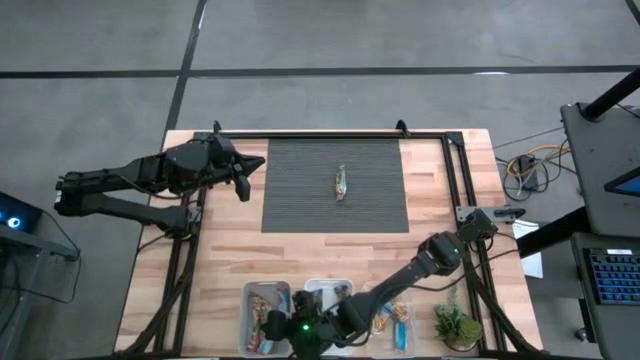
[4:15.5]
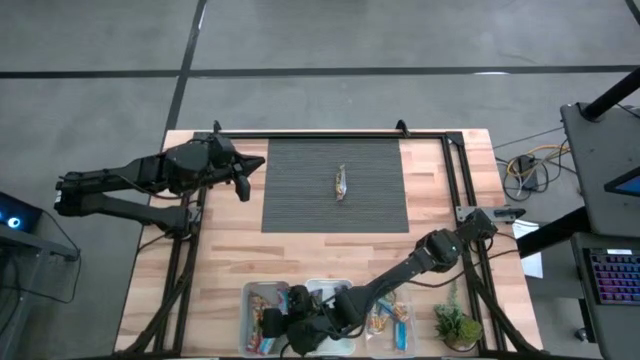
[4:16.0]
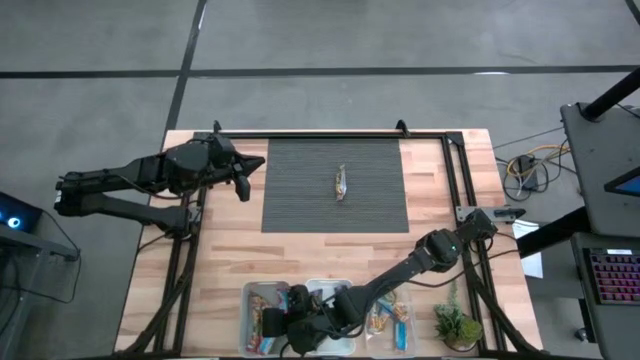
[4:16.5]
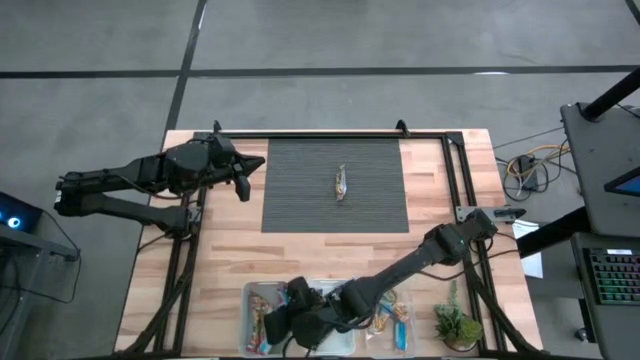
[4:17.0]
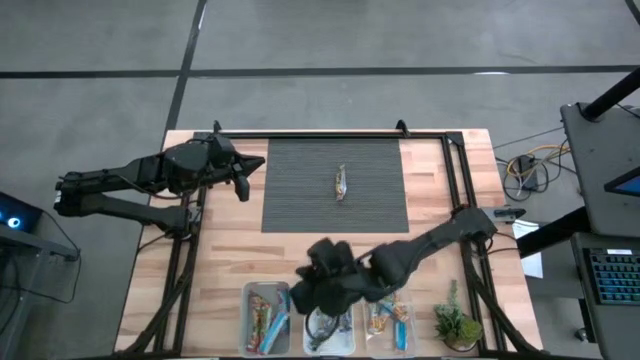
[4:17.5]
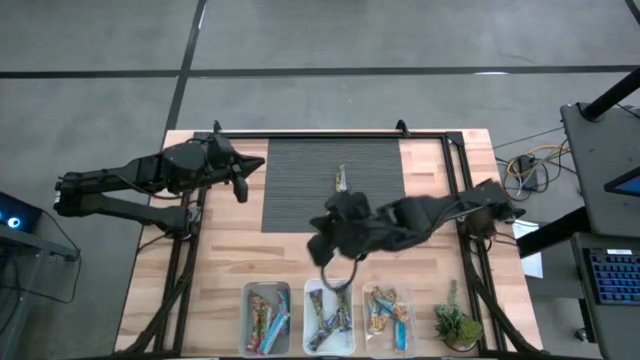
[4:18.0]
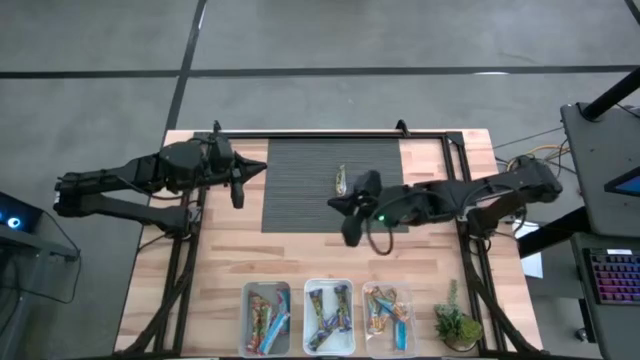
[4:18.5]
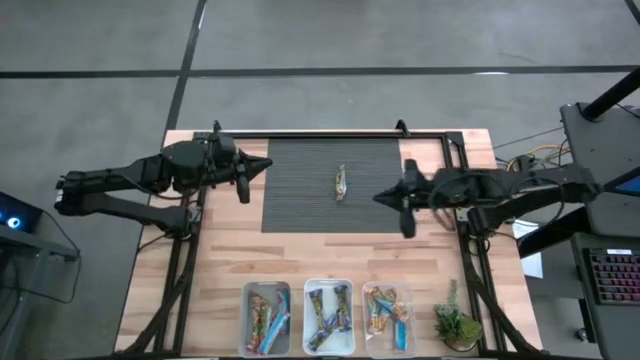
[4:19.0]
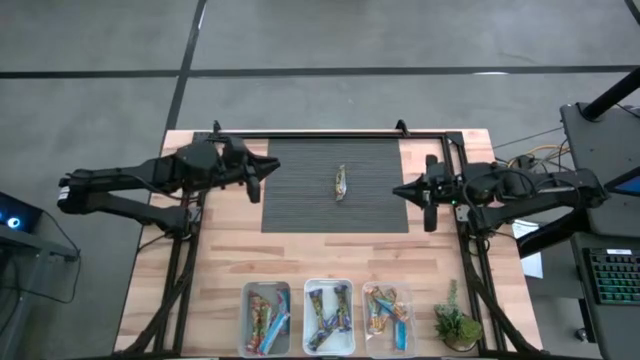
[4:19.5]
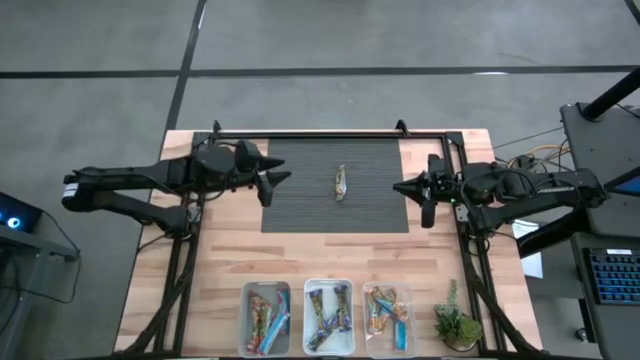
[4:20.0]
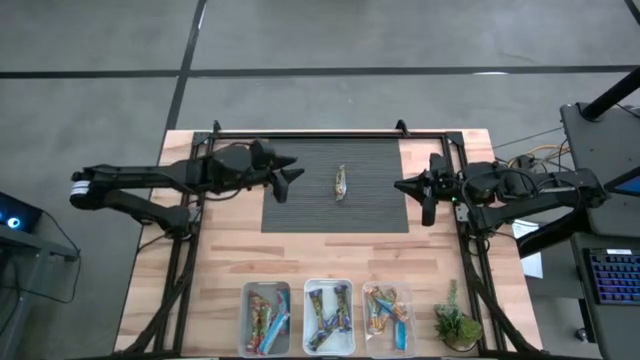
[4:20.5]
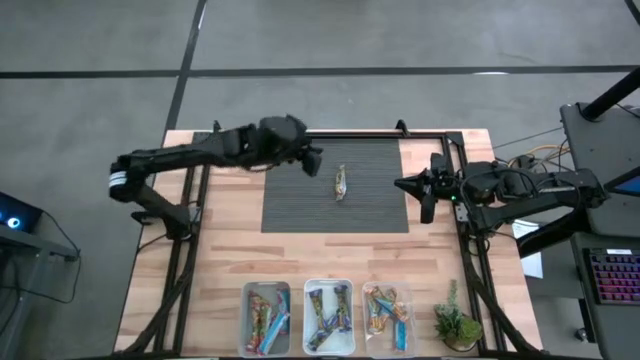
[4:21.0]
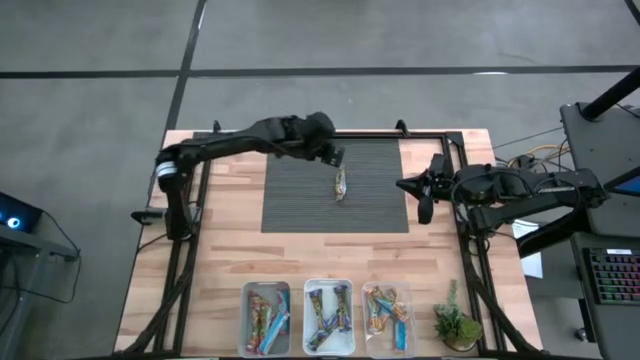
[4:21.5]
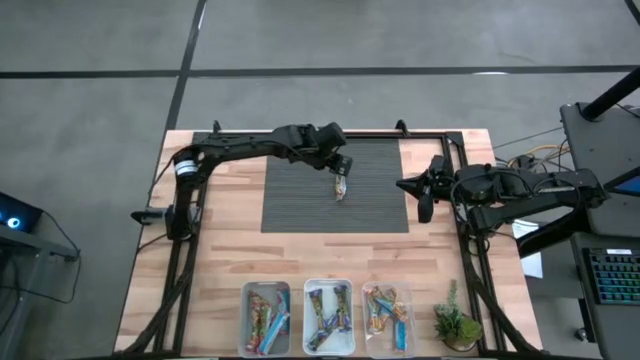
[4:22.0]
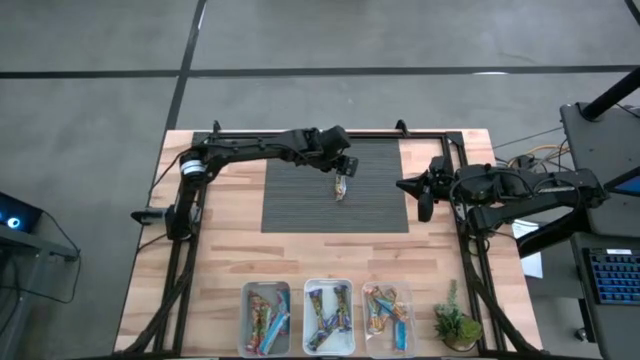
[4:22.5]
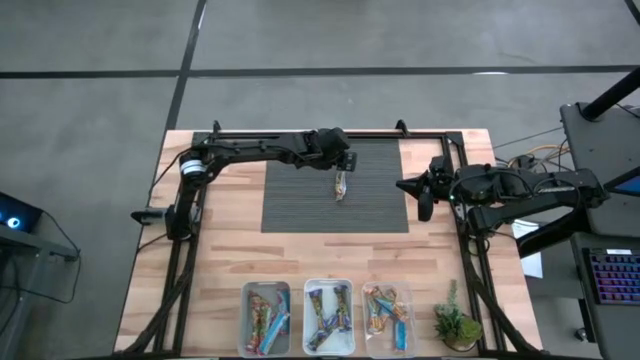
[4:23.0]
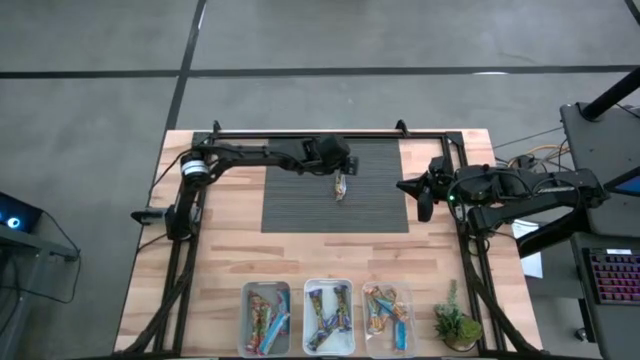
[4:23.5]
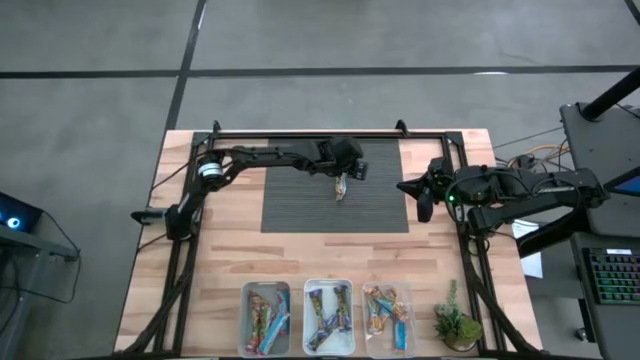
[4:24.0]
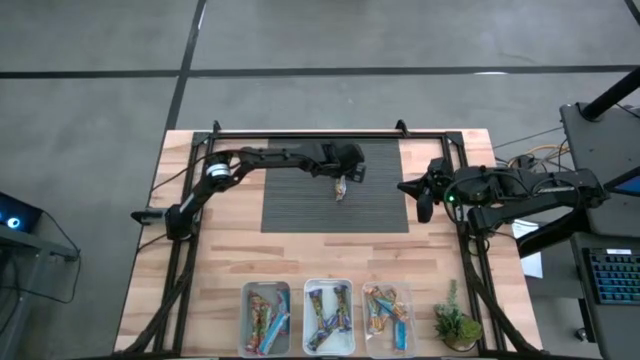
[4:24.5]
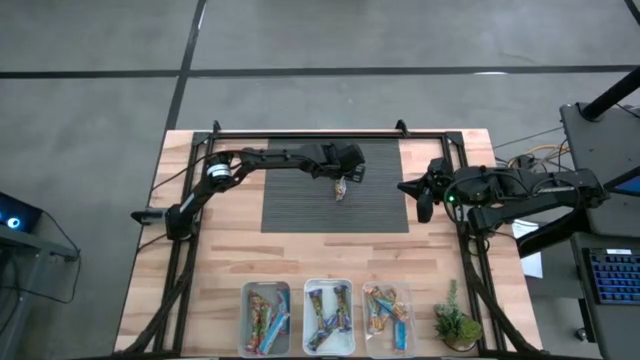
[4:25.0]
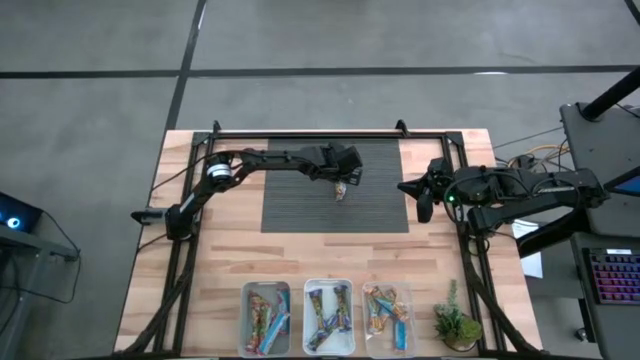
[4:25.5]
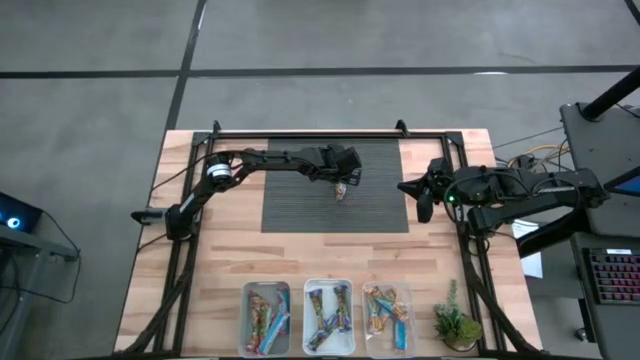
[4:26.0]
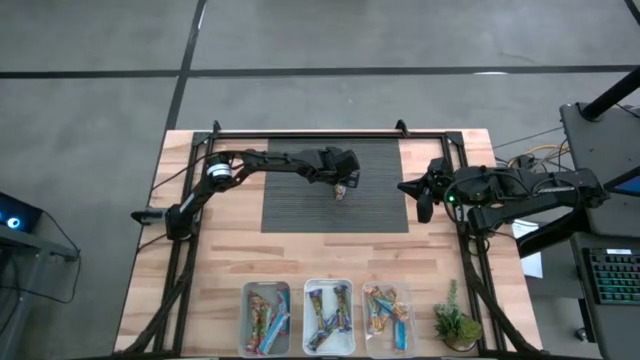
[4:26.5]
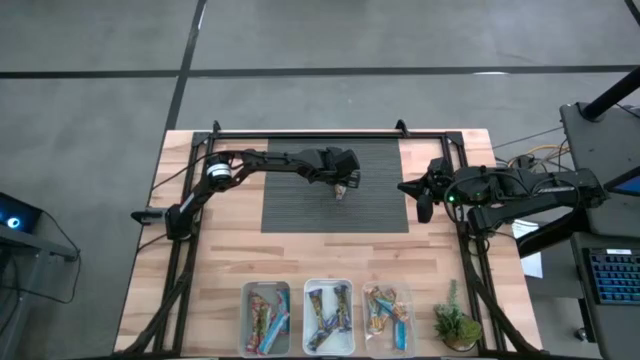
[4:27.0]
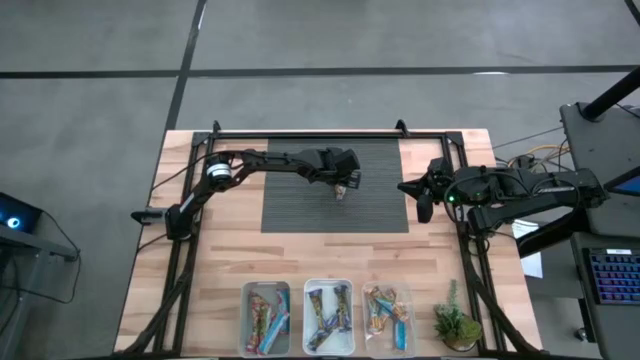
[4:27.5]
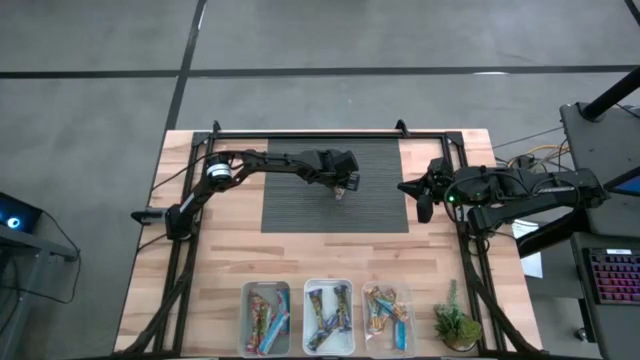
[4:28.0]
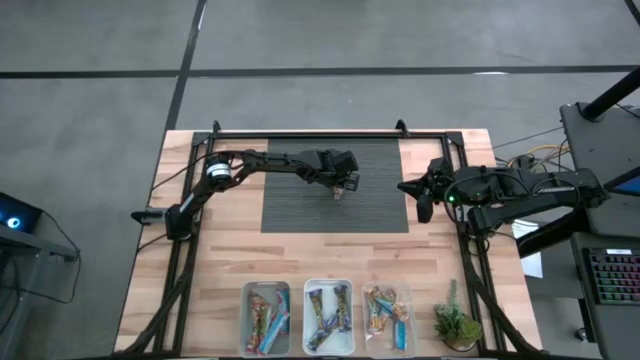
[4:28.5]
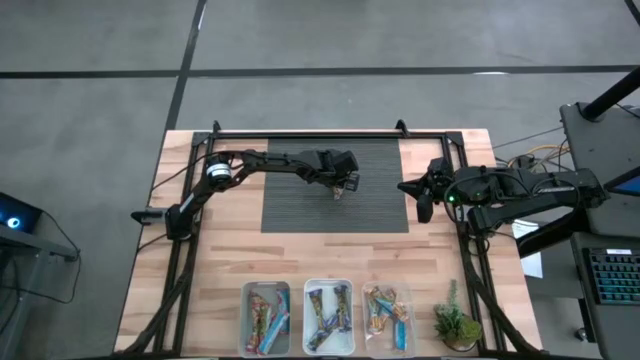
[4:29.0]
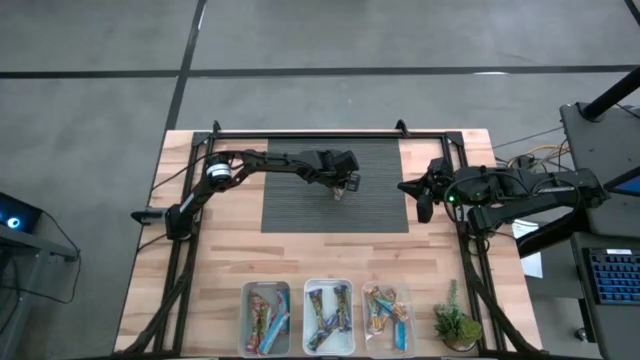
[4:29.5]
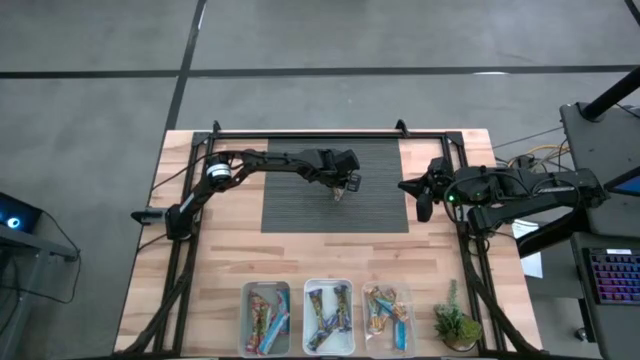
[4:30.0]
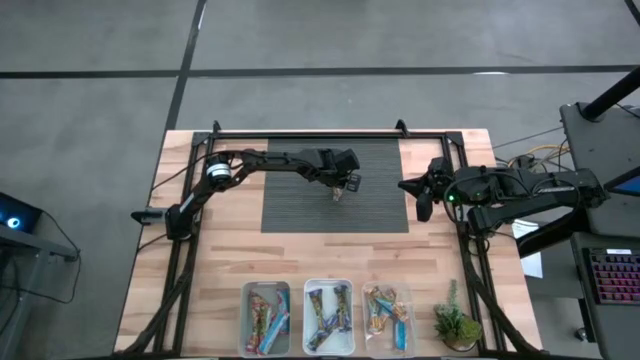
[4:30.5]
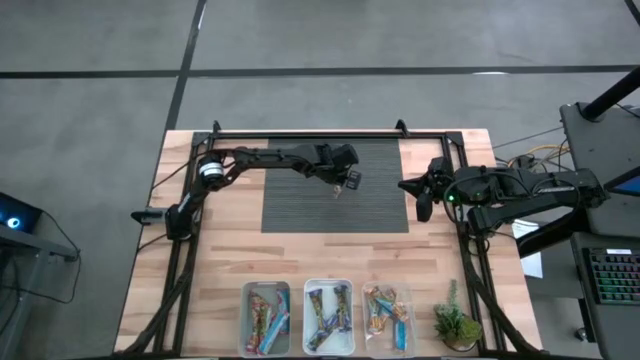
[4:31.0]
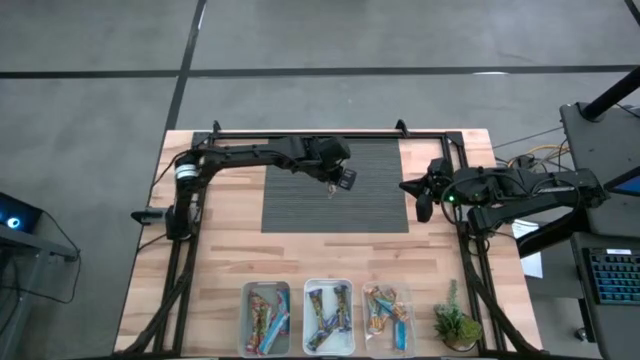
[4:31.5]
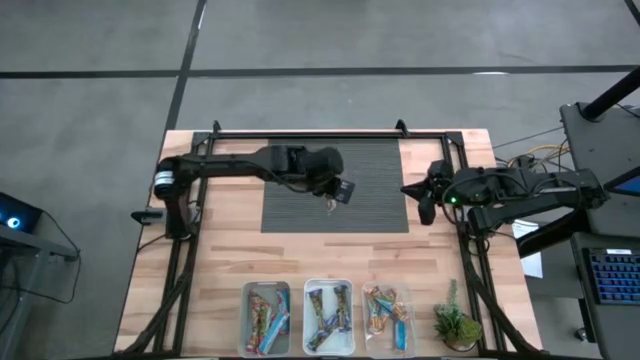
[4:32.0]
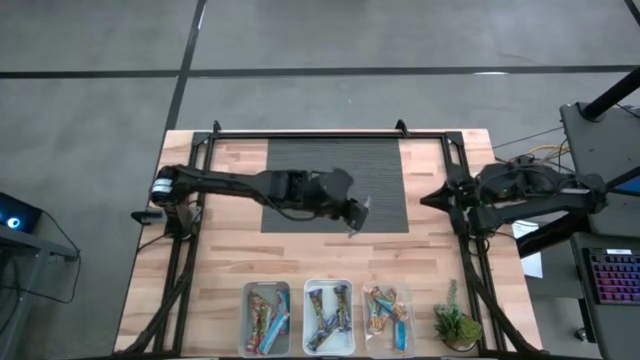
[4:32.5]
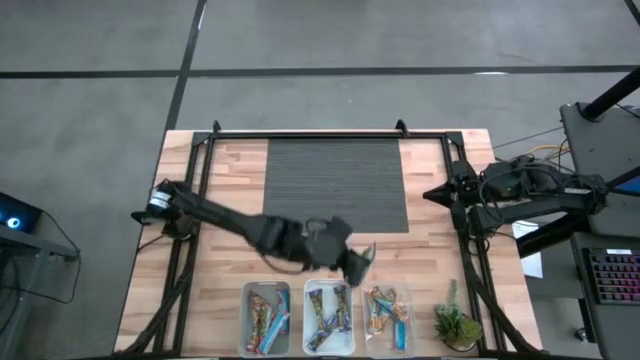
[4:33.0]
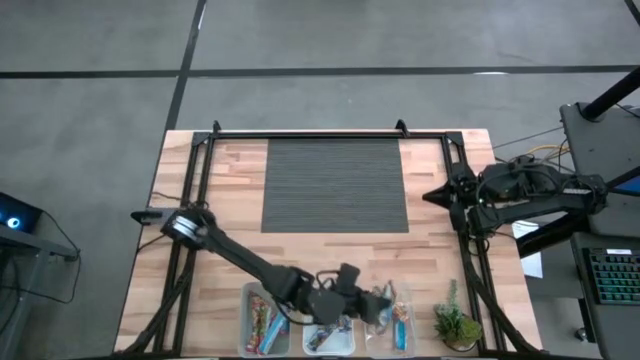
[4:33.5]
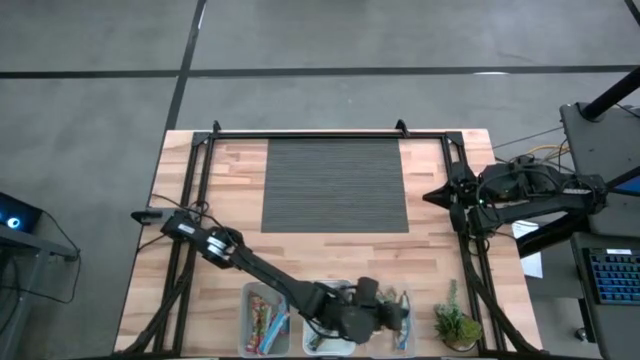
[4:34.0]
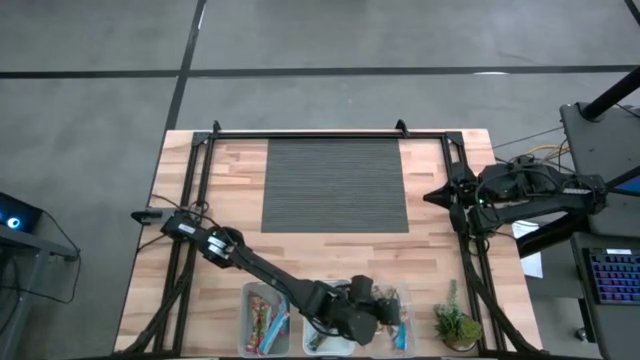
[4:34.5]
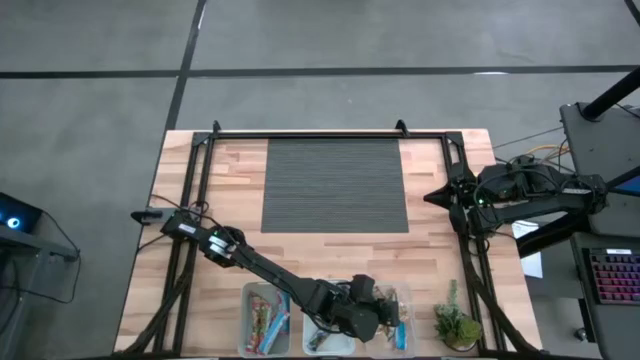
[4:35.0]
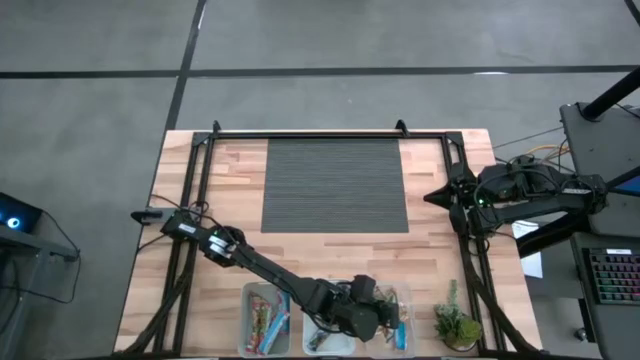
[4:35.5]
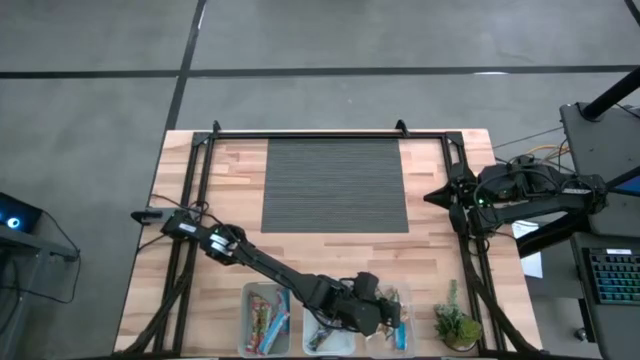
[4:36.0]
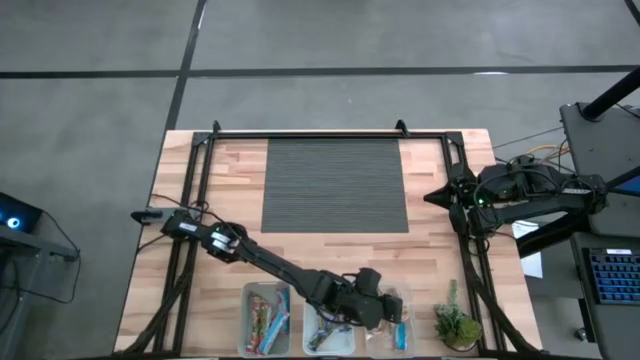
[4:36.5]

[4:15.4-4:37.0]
Task: Pick and place Granola Bars by type
Put the yellow granola bar into the transparent bin

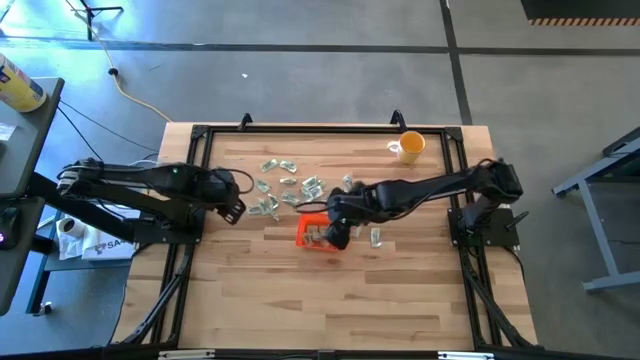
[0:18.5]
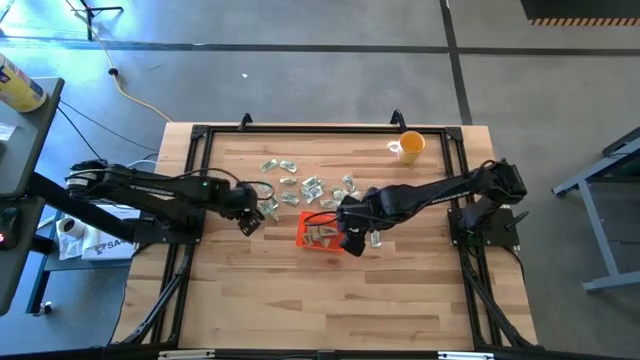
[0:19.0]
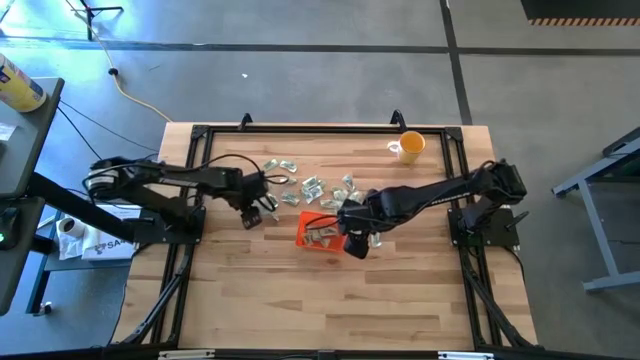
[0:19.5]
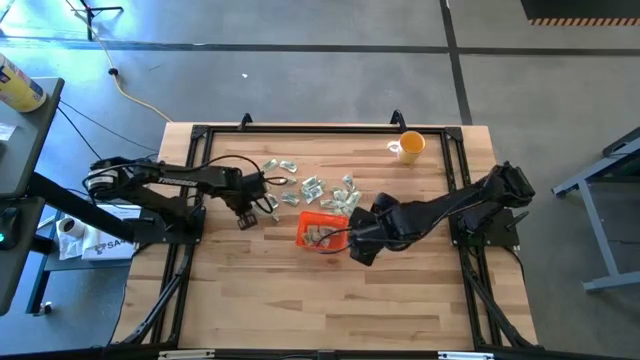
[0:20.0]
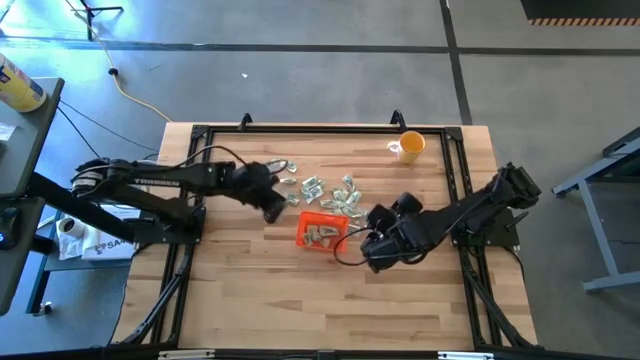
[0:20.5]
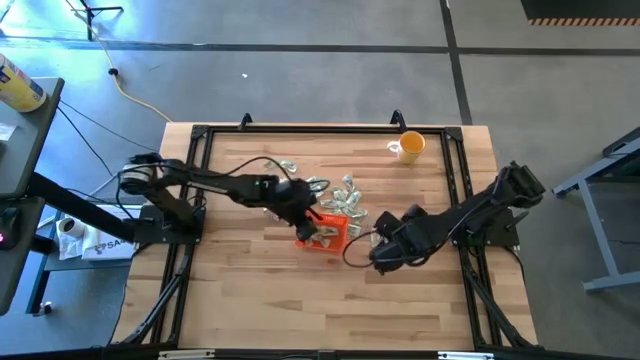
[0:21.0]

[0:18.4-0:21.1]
Task: Pick and place Stevia / Truvia into bins
Put the stevia packet into the orange bin
